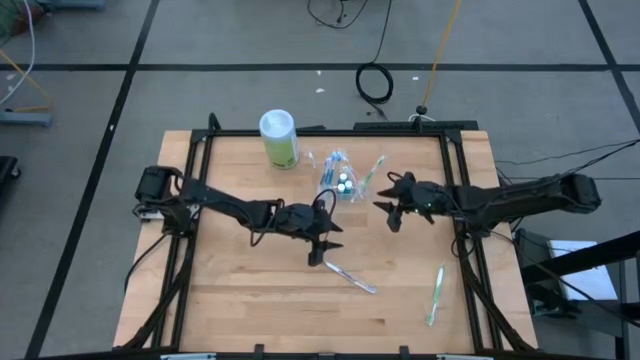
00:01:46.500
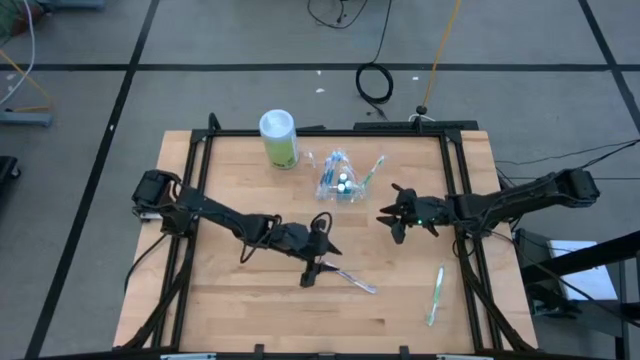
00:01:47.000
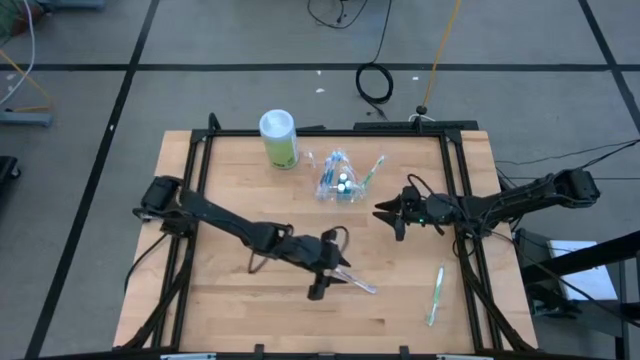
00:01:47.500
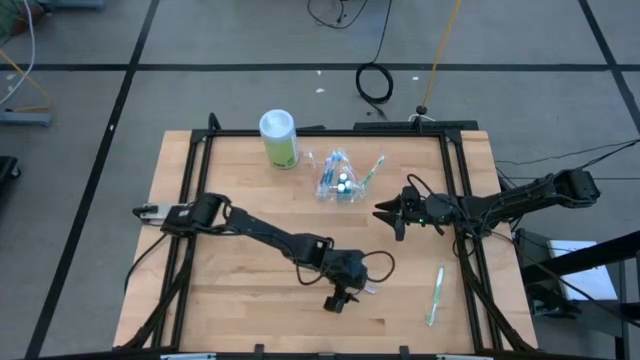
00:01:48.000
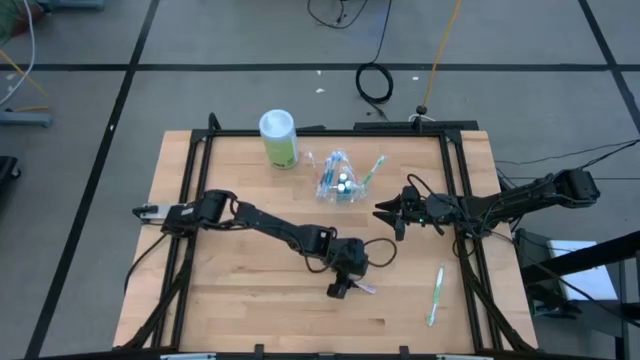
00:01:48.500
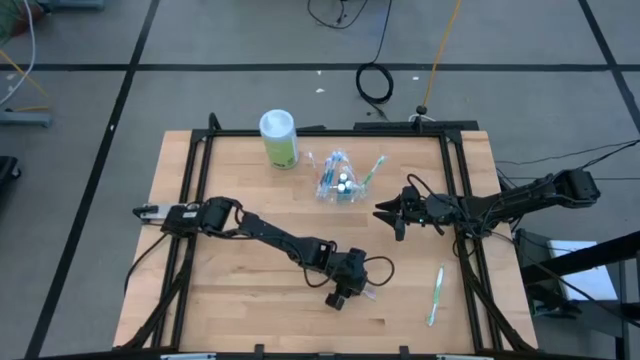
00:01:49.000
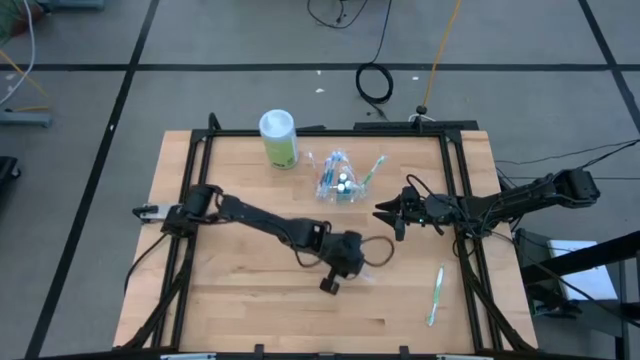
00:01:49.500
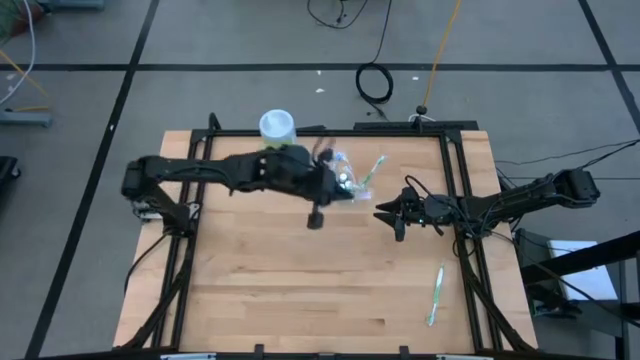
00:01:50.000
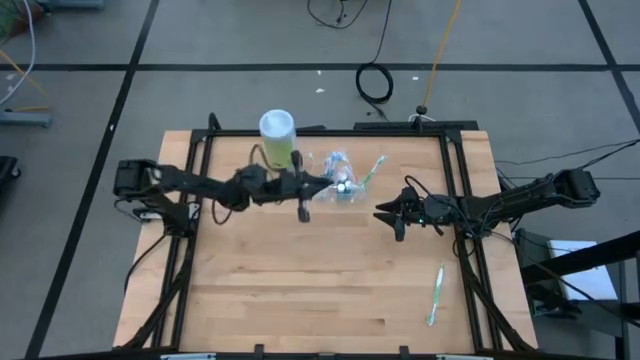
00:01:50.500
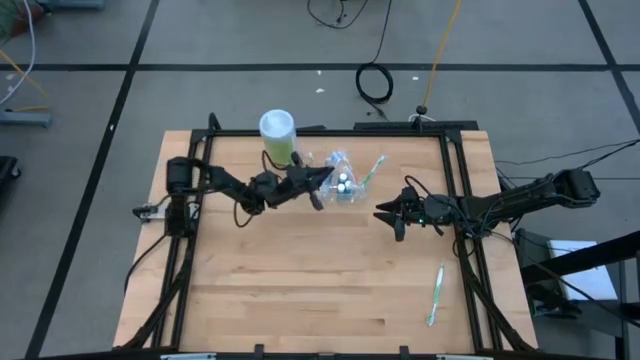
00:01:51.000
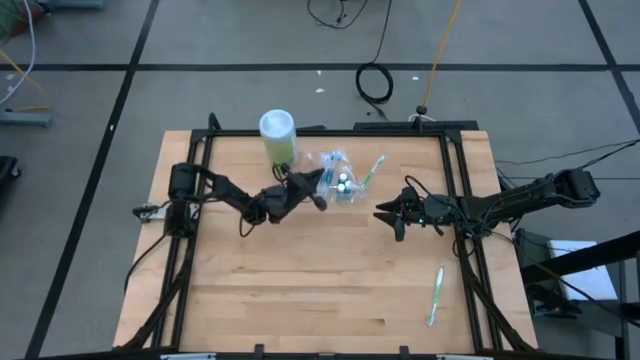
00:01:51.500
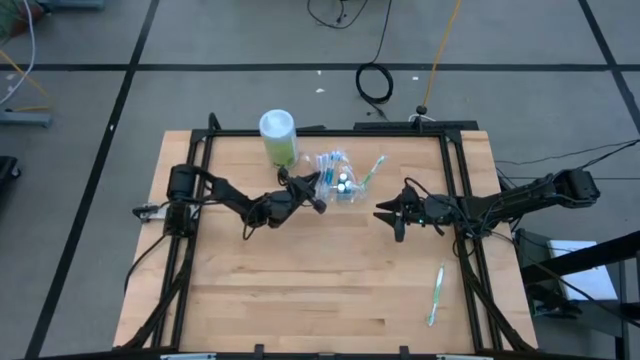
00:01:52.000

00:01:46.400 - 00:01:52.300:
Task: Pick & Place toothbrushing station
Put the purple toothbrush into the transparent organizer

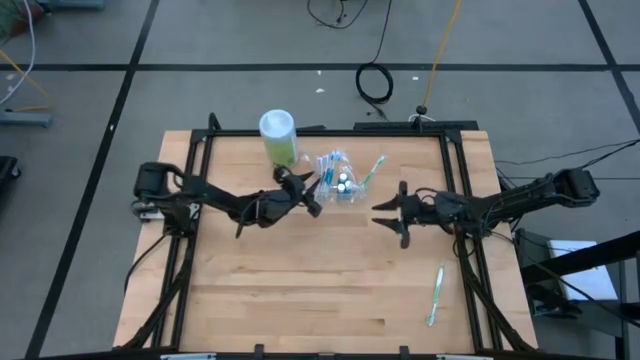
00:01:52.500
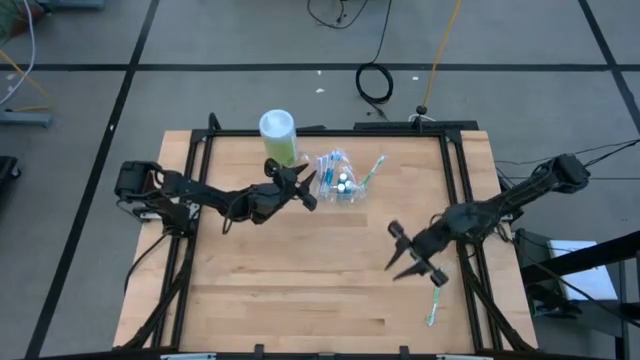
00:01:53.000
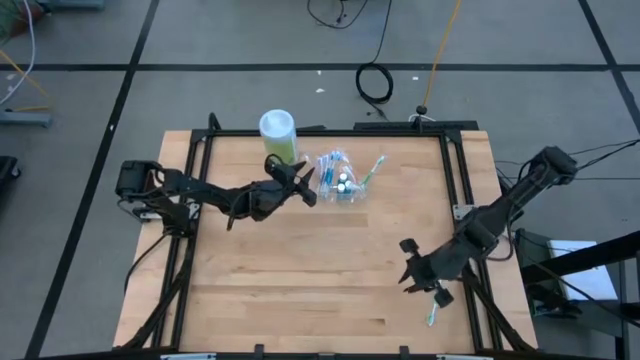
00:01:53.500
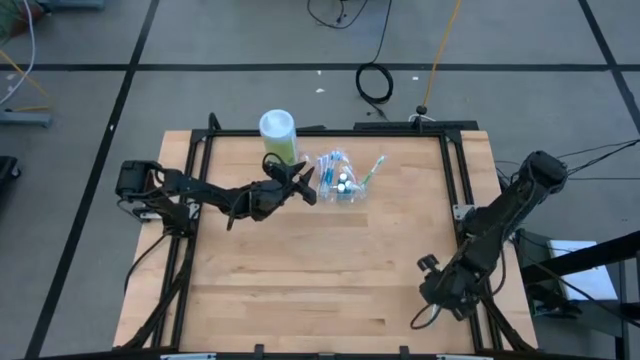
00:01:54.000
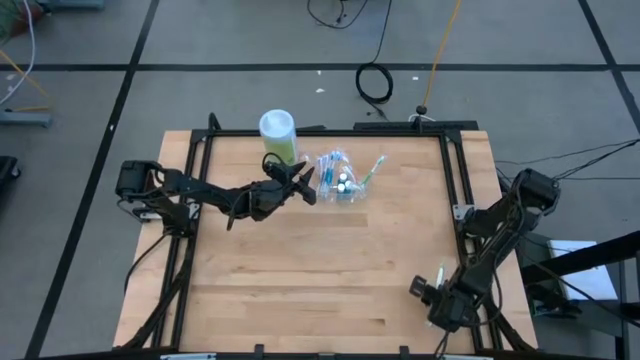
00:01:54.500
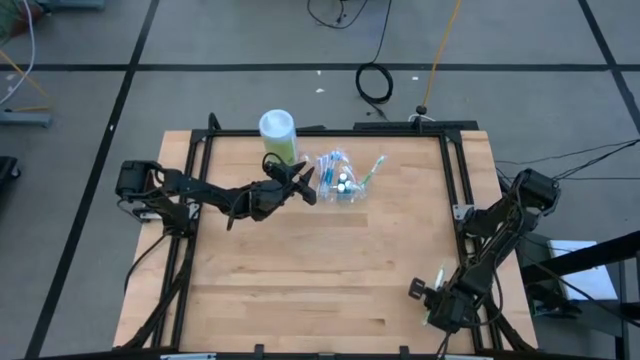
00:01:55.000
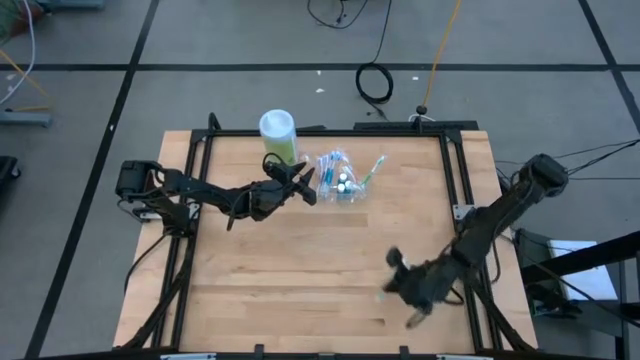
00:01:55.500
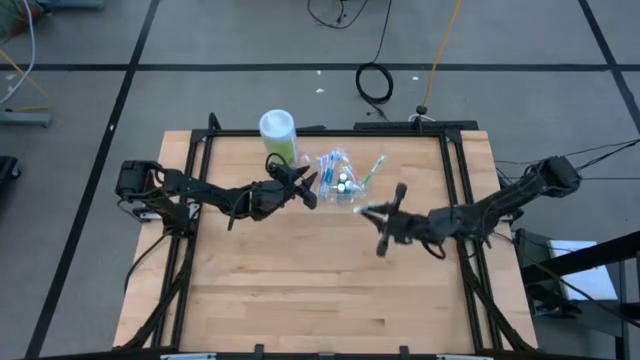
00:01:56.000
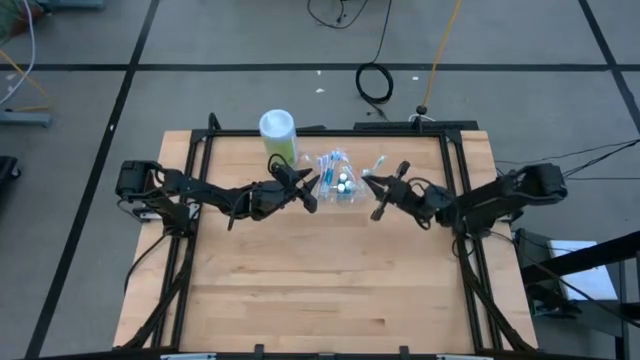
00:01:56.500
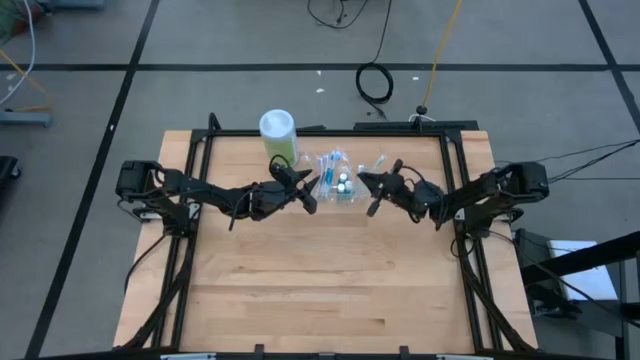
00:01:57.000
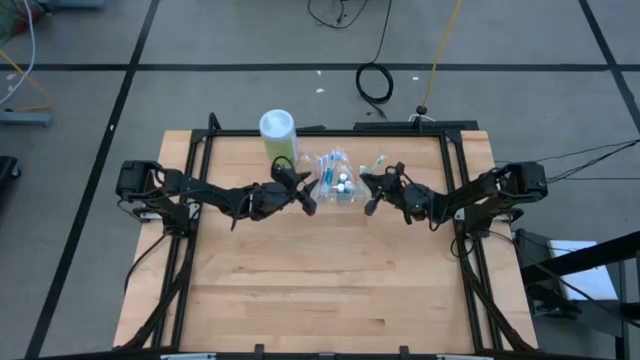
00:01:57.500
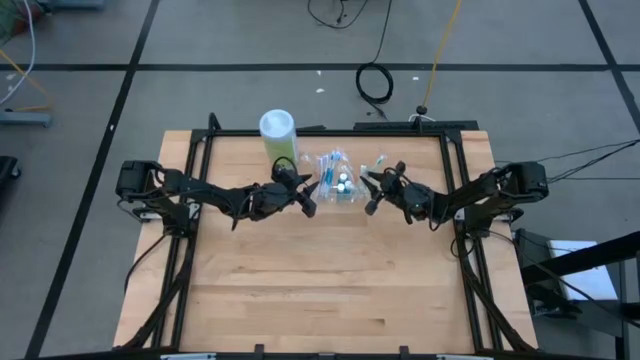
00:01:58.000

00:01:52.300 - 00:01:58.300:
Put the green toothbrush into the transparent organizer

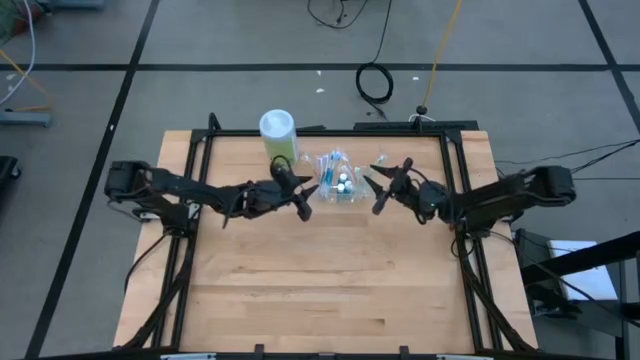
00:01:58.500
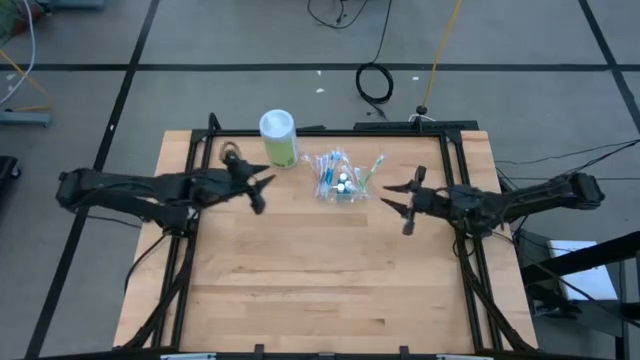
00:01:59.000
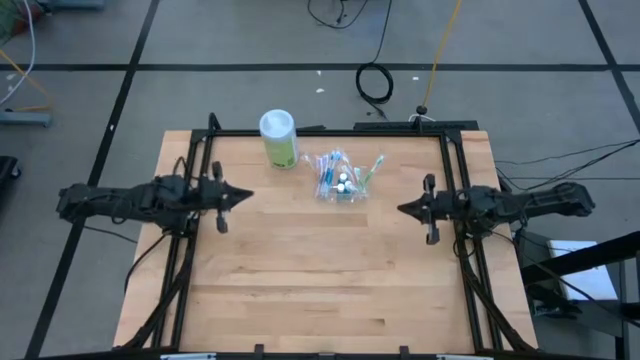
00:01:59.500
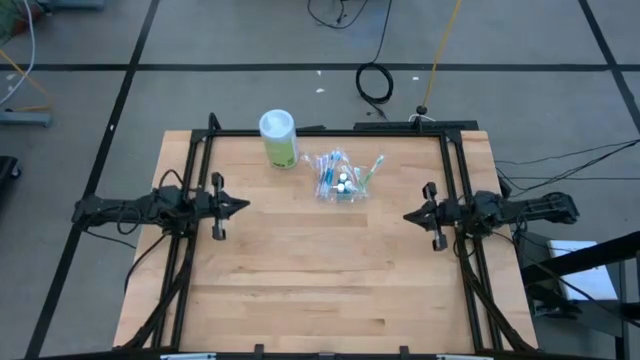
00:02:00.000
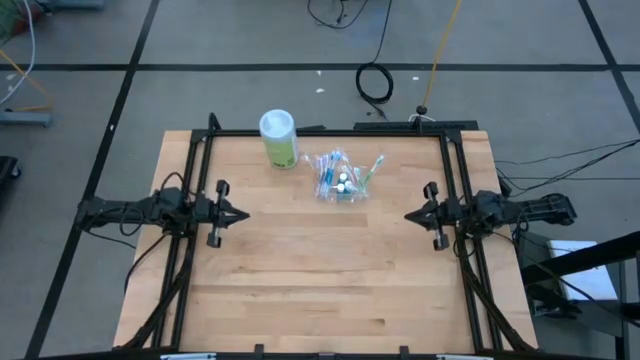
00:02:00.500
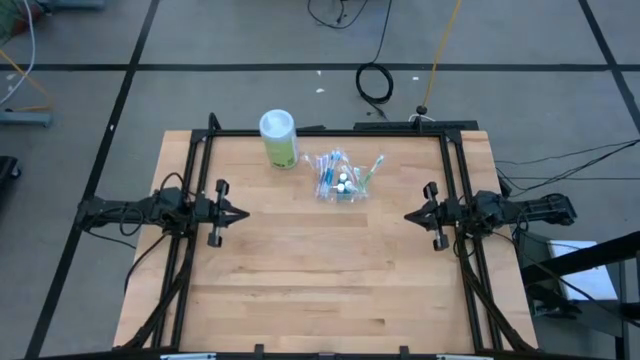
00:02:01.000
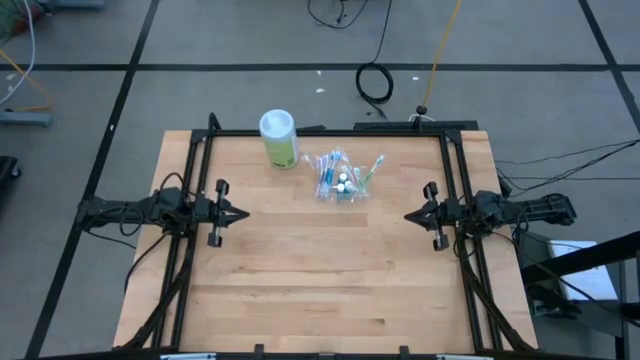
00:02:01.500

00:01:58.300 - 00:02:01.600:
Return to Home Position

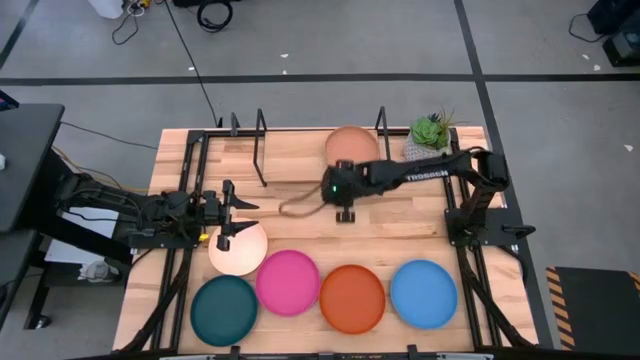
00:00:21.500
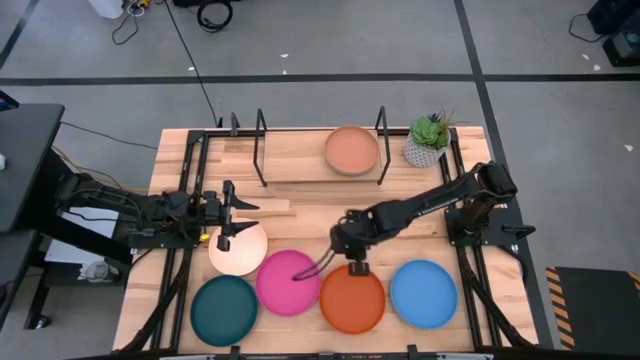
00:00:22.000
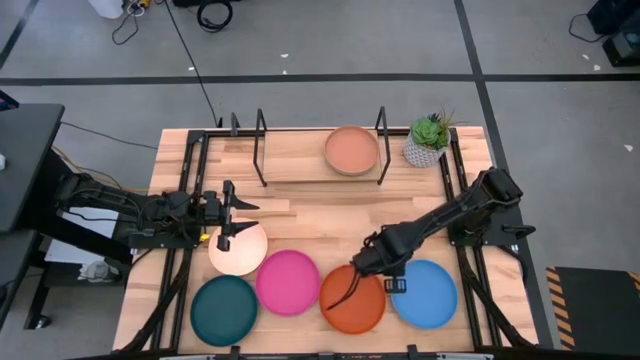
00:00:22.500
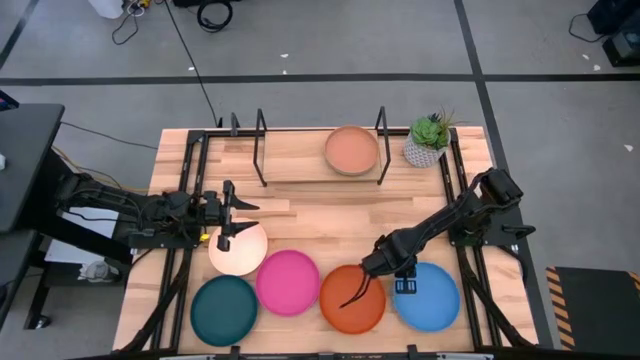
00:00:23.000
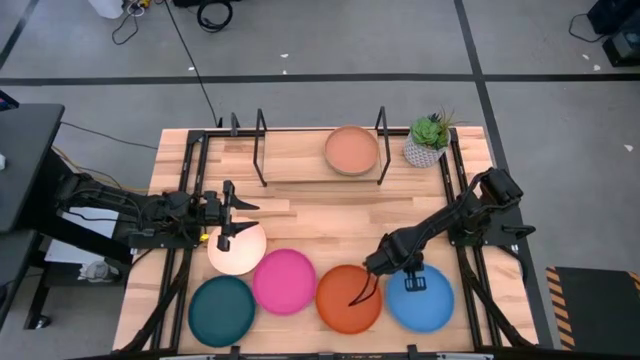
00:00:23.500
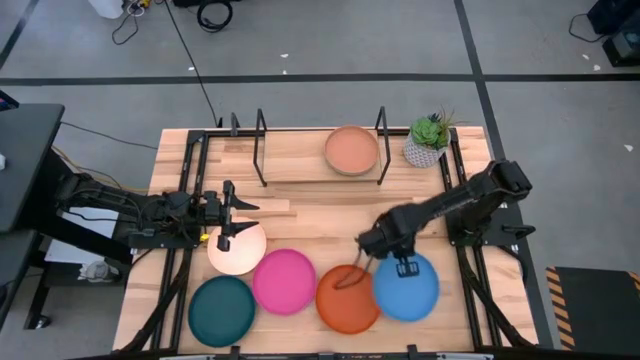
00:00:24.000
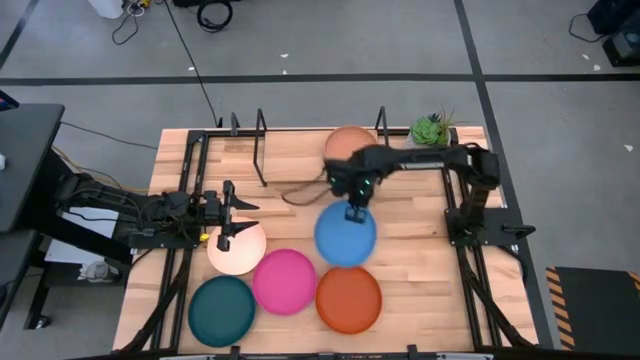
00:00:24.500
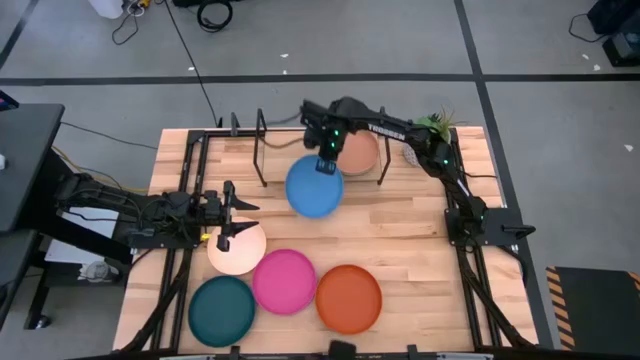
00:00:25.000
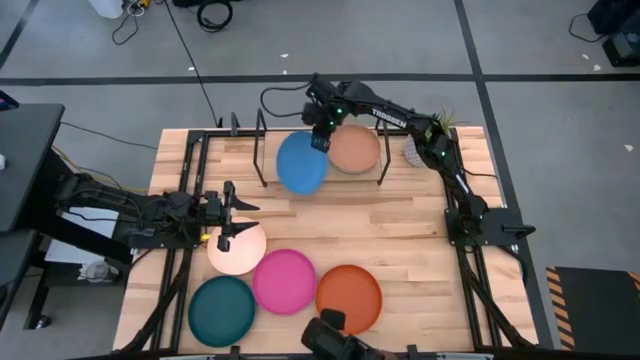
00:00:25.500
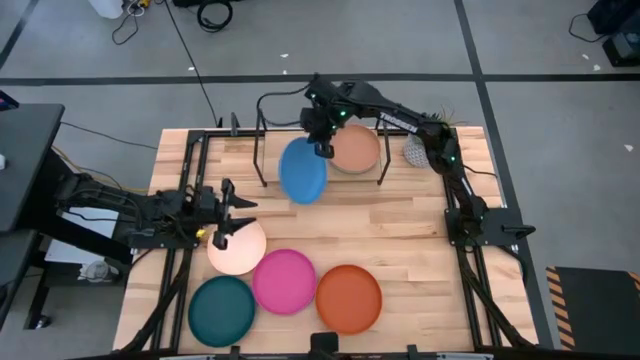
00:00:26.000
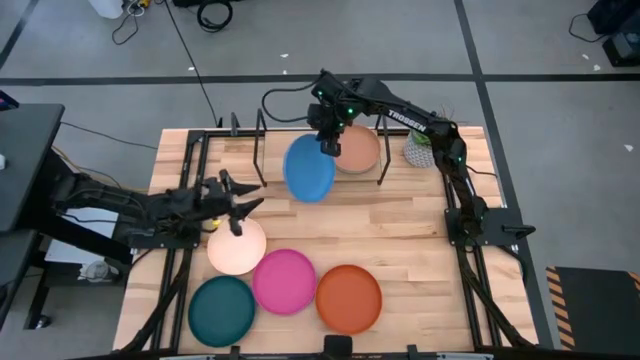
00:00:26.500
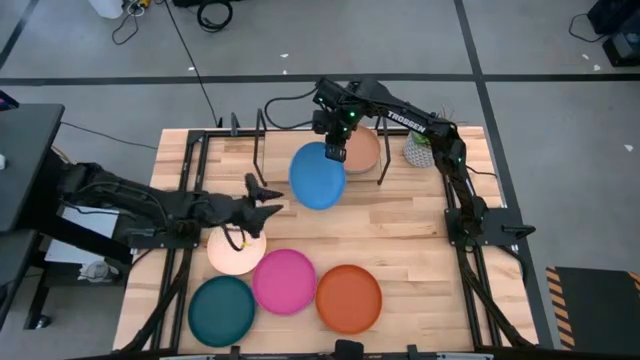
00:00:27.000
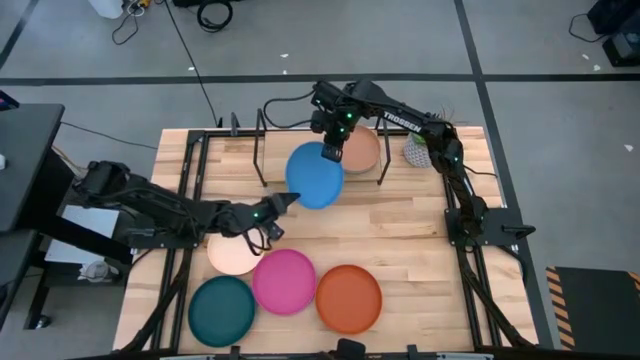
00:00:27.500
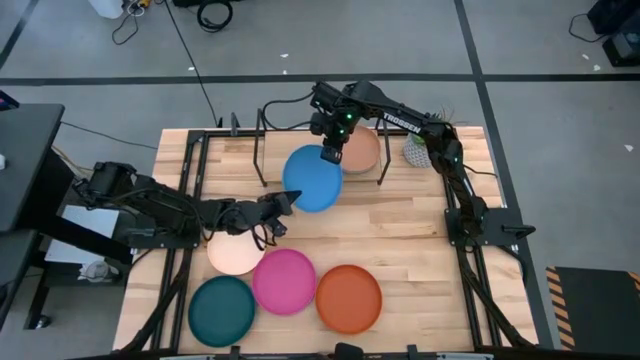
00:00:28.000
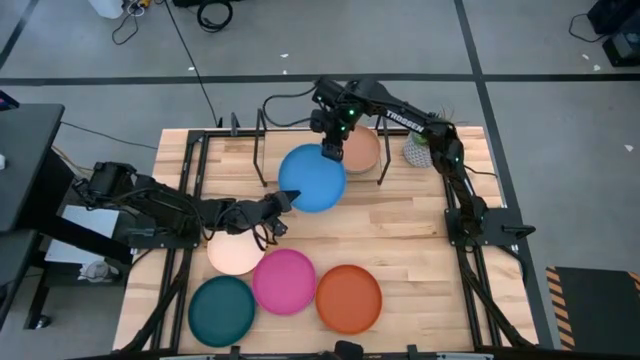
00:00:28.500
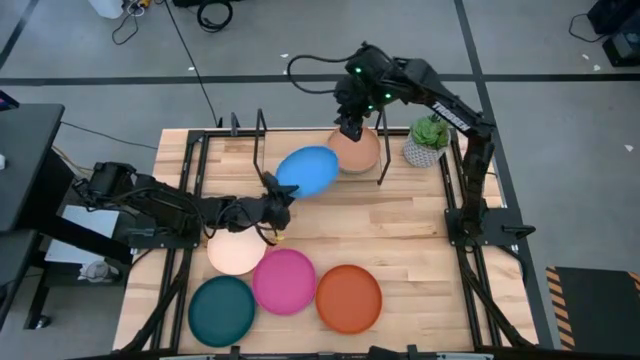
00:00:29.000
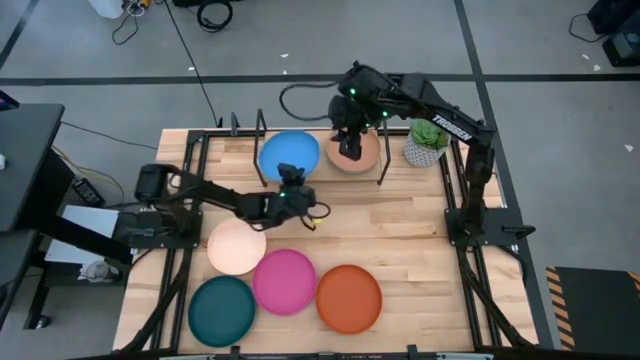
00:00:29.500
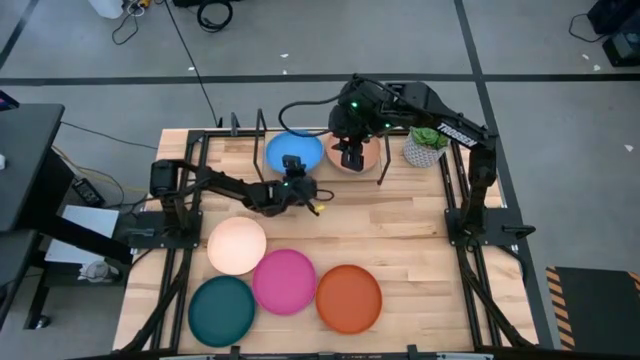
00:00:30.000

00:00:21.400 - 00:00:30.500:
Task: Place and stack plates onto a shelf
Put the blue plate on the shelf
